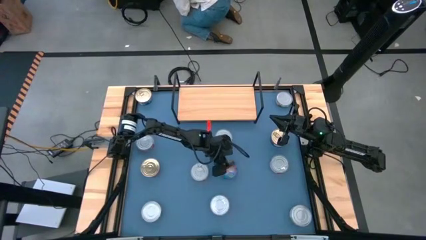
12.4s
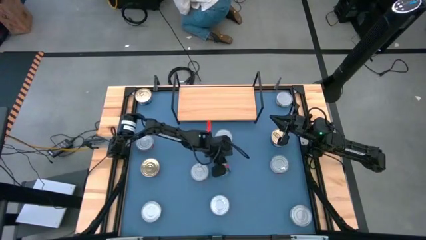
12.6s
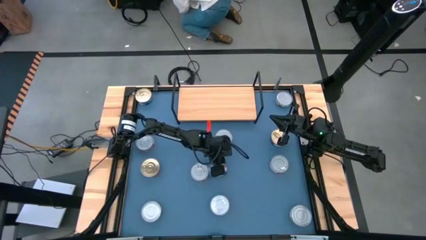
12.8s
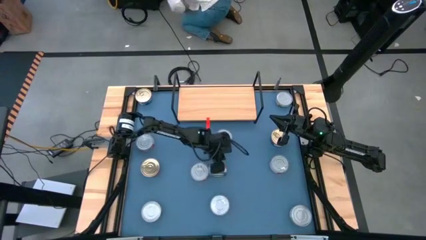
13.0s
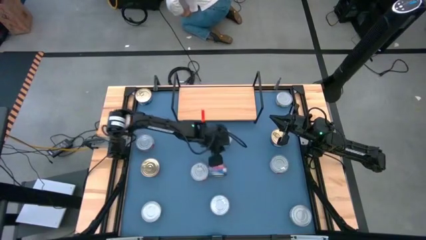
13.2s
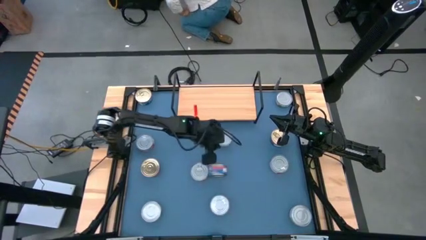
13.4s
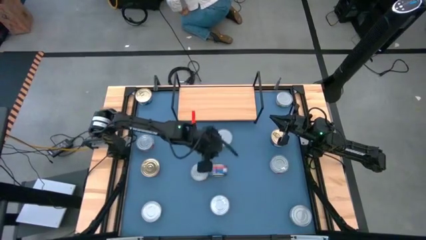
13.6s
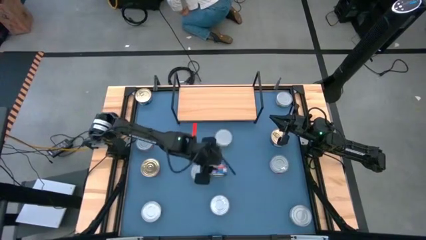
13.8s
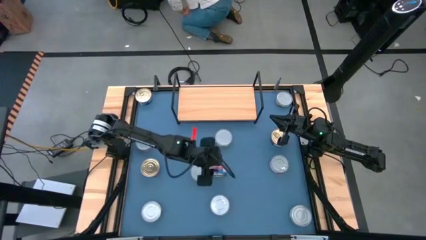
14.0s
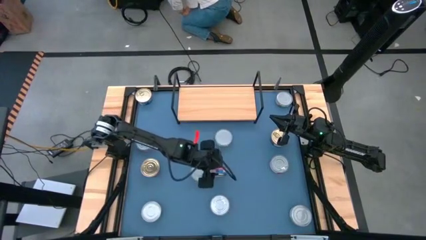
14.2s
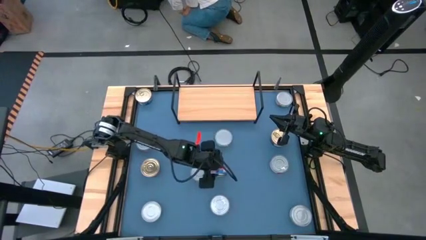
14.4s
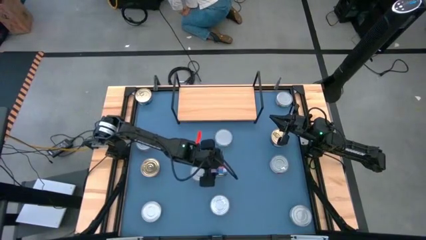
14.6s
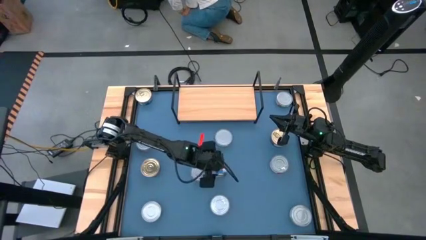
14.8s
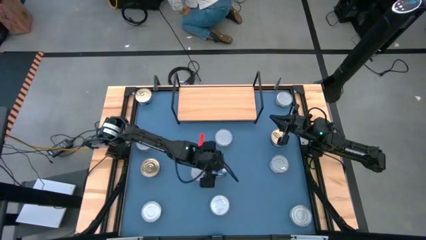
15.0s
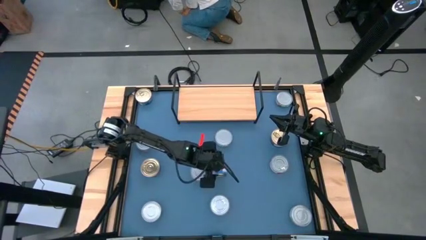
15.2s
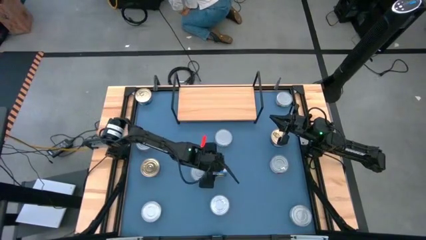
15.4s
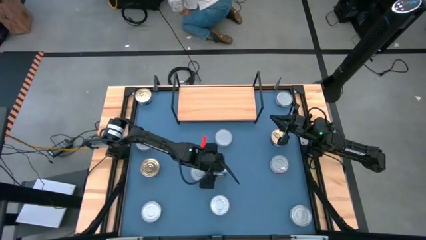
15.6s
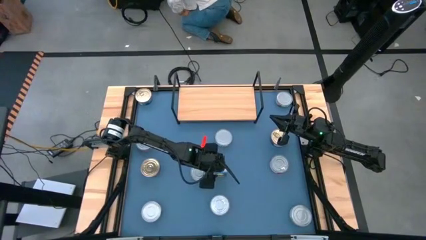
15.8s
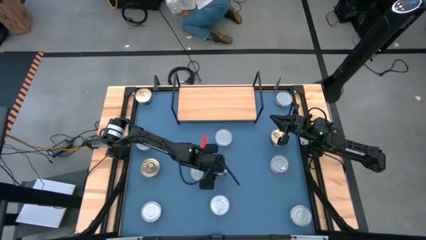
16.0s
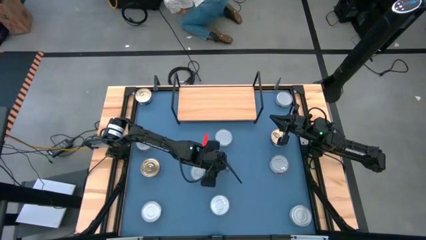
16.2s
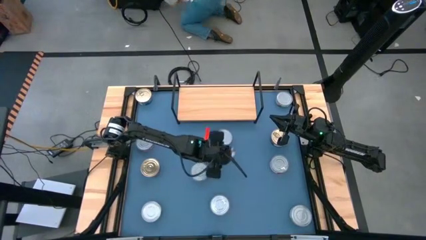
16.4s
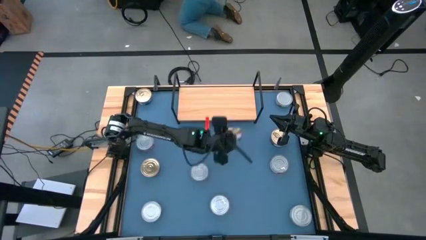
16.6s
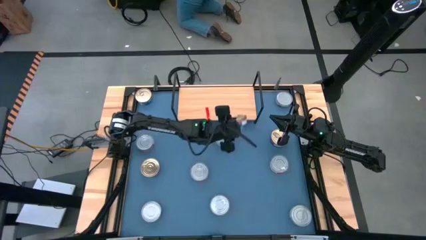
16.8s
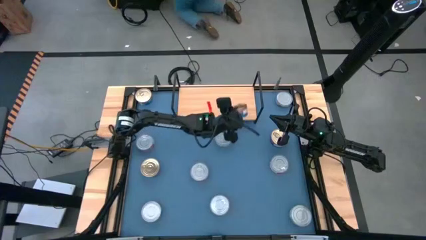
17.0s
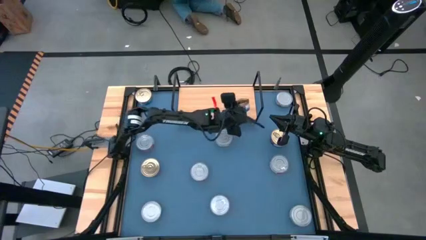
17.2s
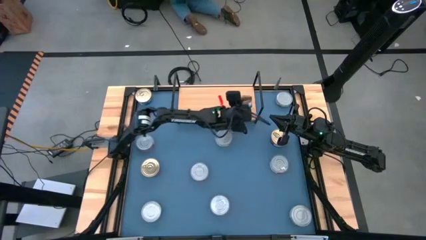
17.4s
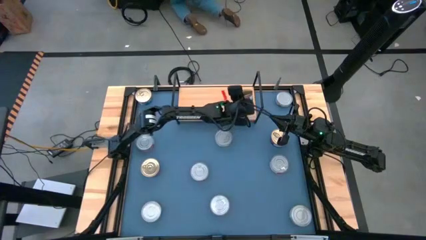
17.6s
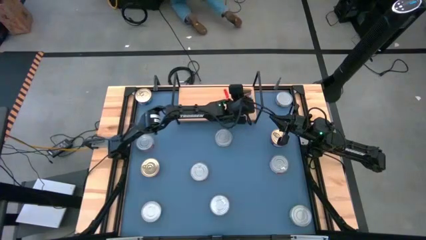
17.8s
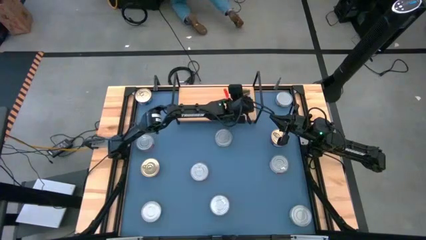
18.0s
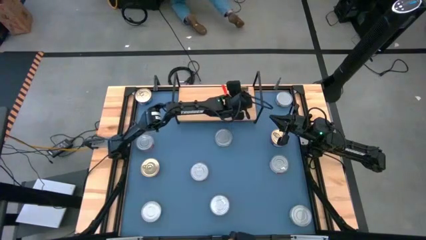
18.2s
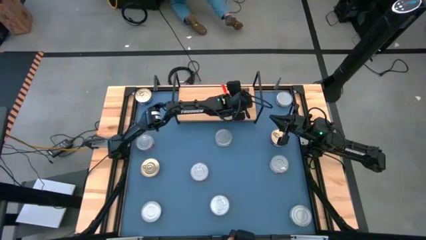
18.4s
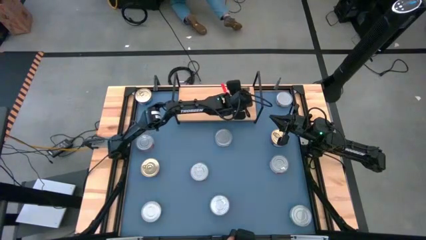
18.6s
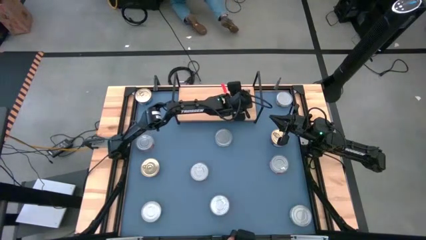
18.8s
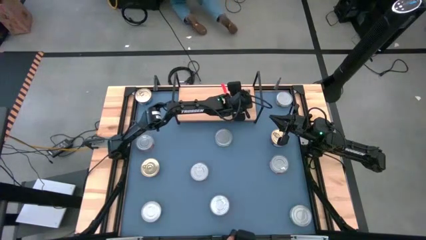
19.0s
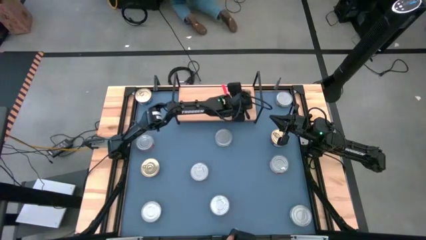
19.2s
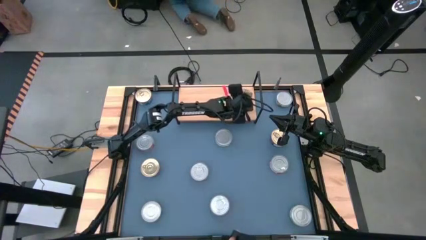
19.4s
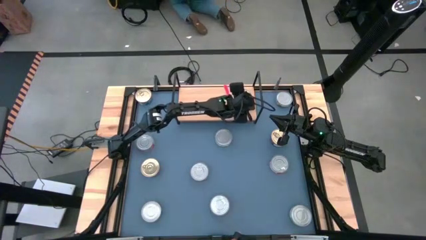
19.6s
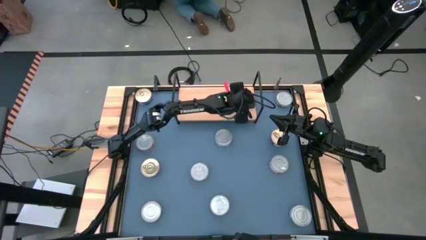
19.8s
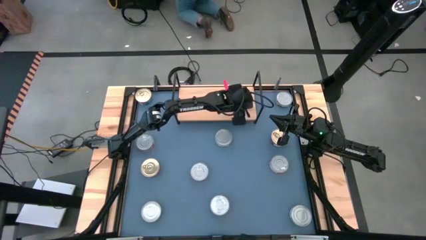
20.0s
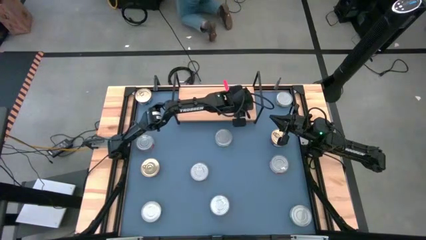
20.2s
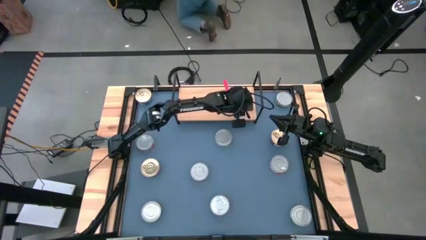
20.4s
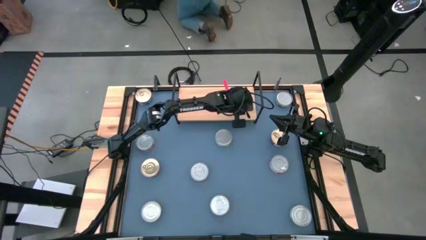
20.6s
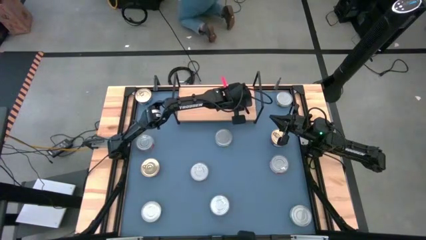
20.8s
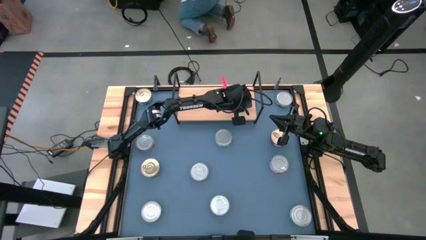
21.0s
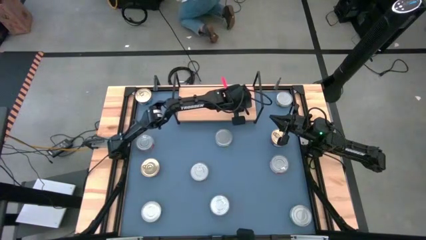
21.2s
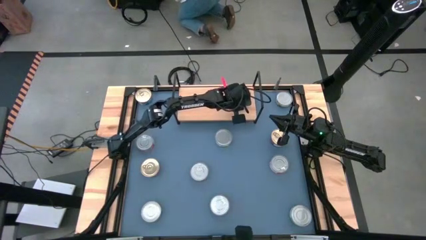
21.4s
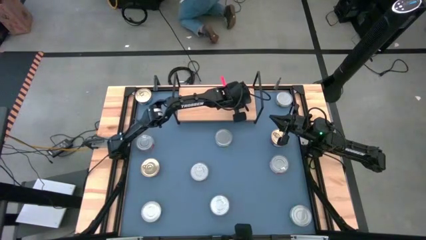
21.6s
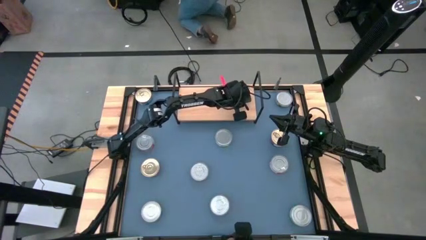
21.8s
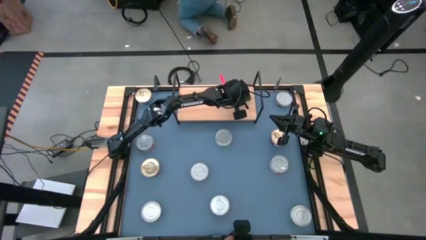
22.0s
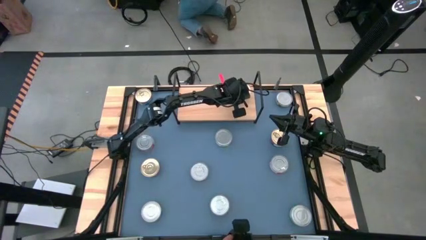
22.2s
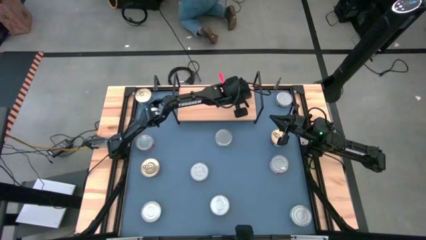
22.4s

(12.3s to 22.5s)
Task: Stack canned seafood by type on shelf
Put the blue tuna can on the shelf

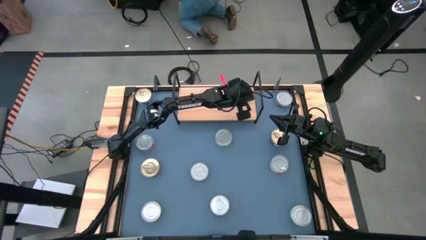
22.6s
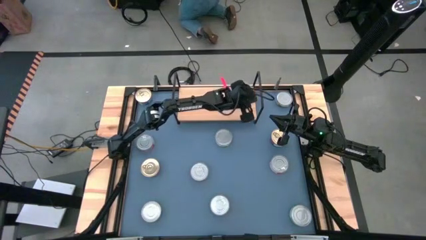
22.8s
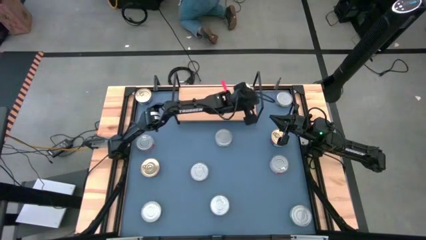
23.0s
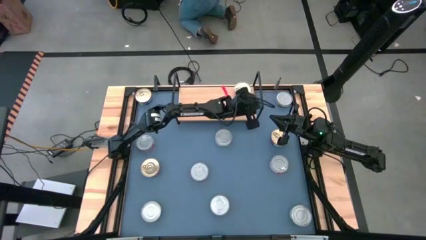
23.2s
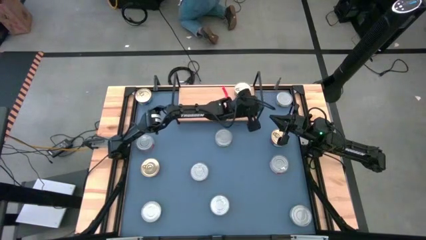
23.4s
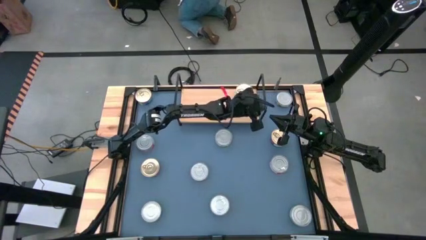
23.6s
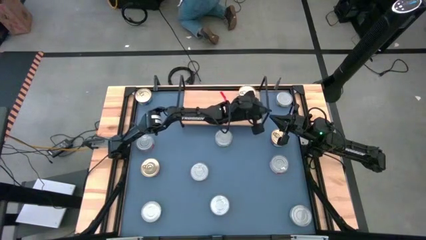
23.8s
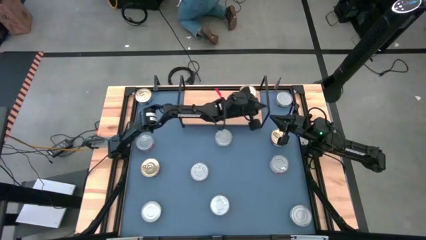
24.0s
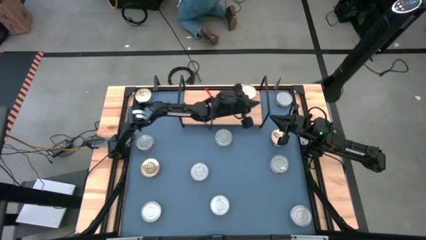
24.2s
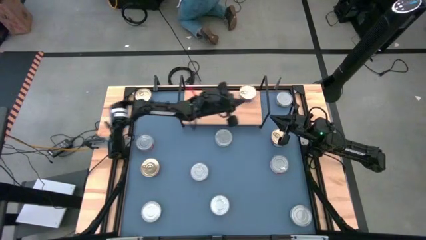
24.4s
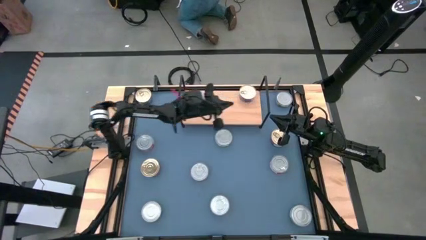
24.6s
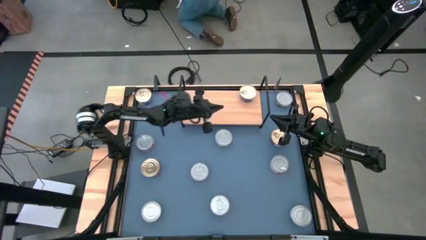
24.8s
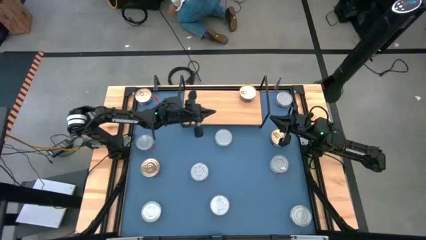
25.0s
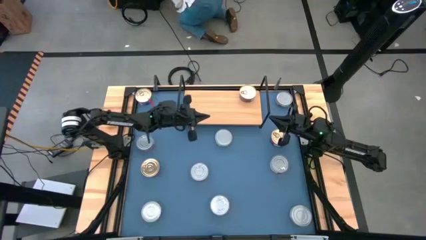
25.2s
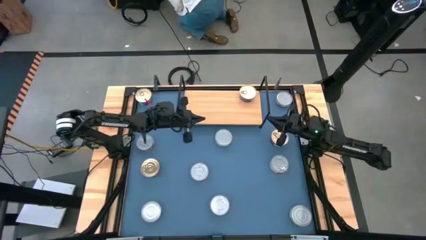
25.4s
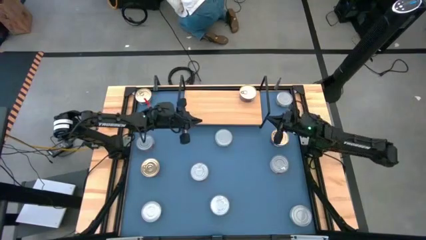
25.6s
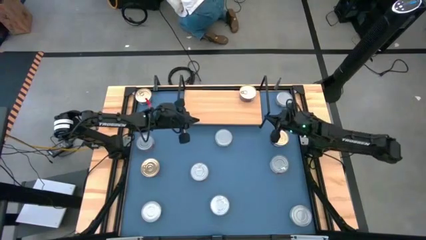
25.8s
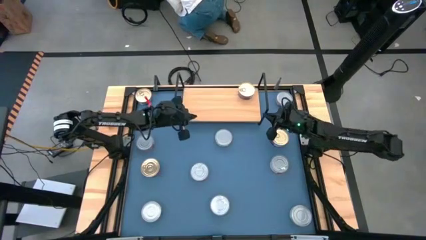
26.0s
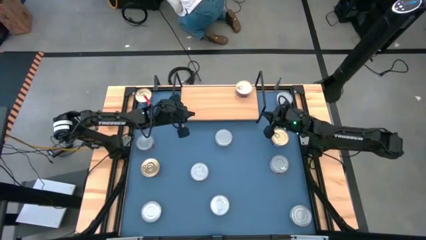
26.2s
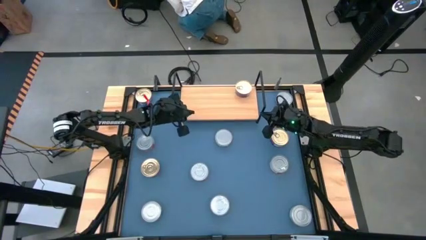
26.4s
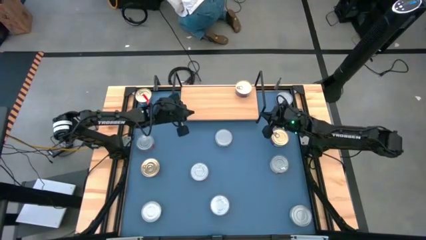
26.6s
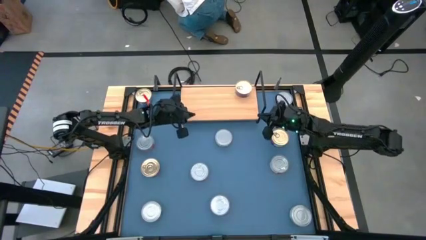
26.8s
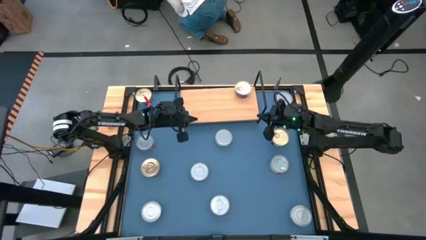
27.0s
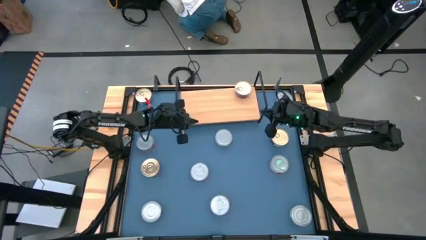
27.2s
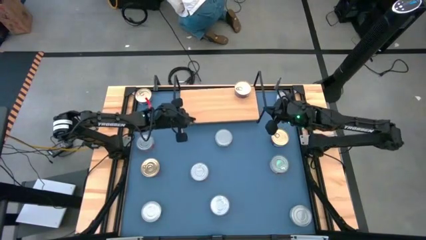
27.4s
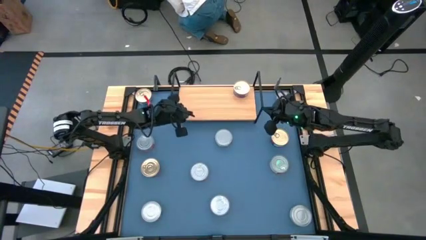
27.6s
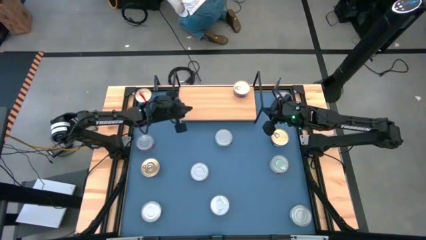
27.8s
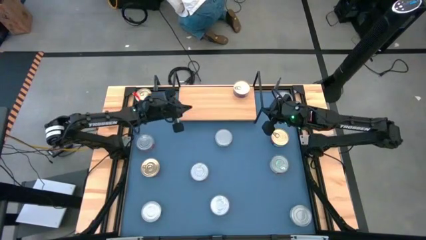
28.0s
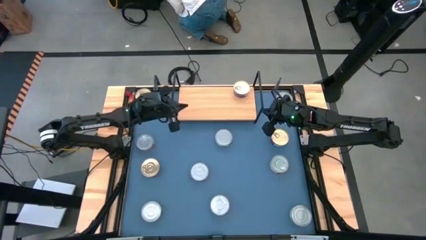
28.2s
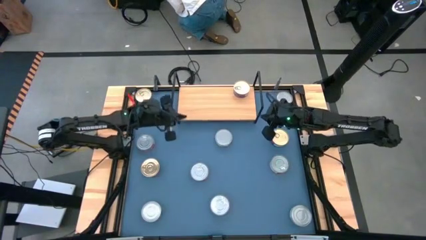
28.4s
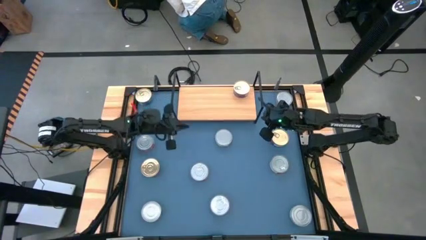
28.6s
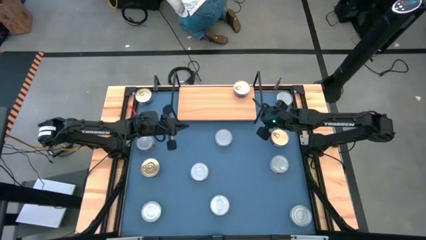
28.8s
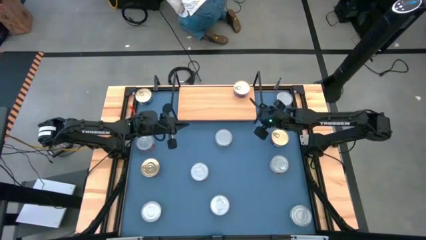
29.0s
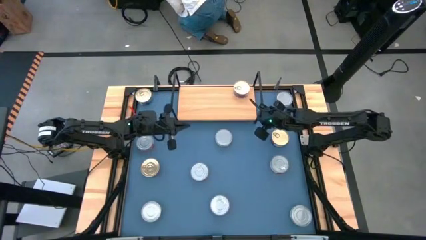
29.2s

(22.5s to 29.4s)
Adjust the shelf
